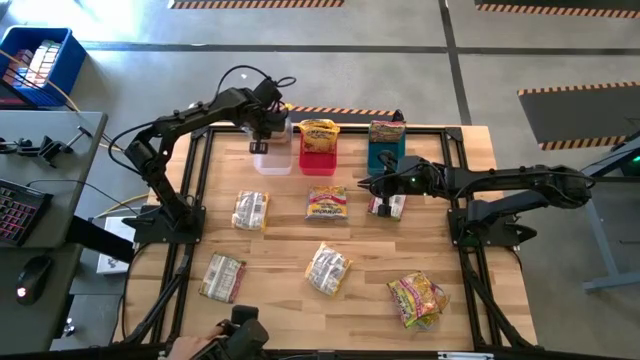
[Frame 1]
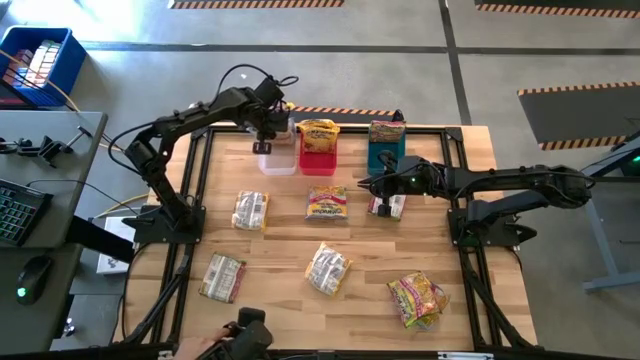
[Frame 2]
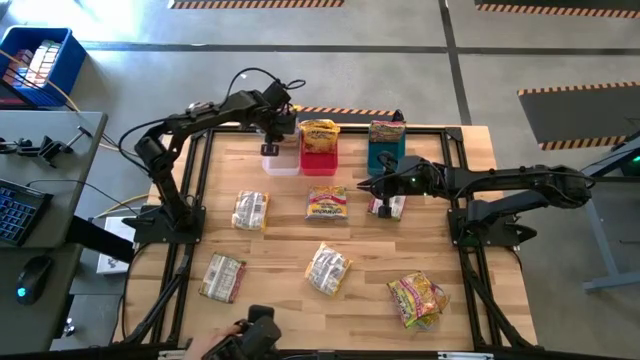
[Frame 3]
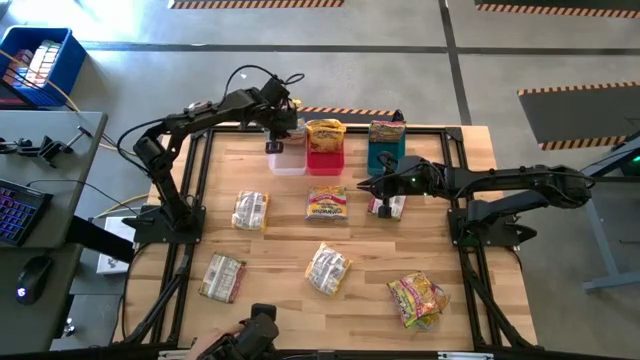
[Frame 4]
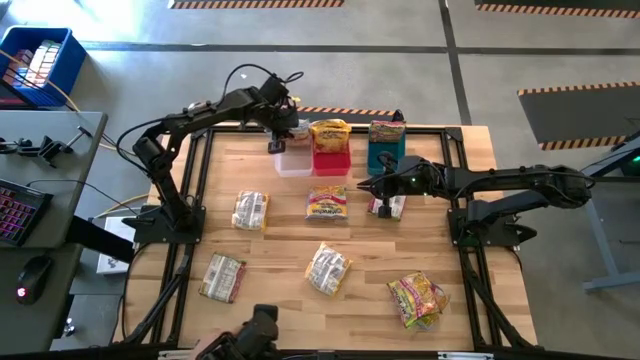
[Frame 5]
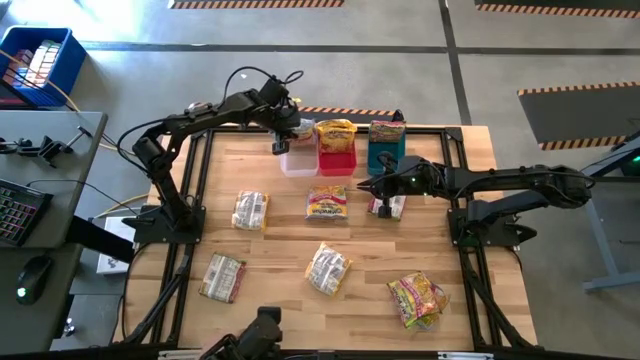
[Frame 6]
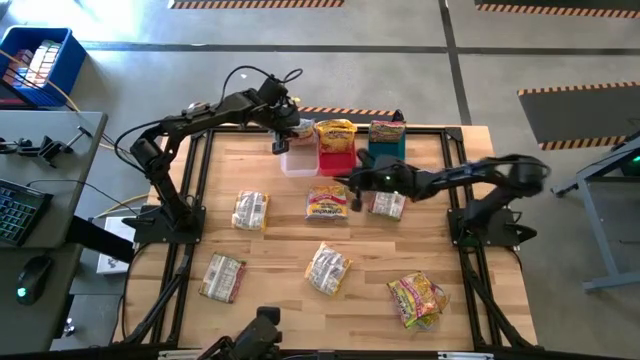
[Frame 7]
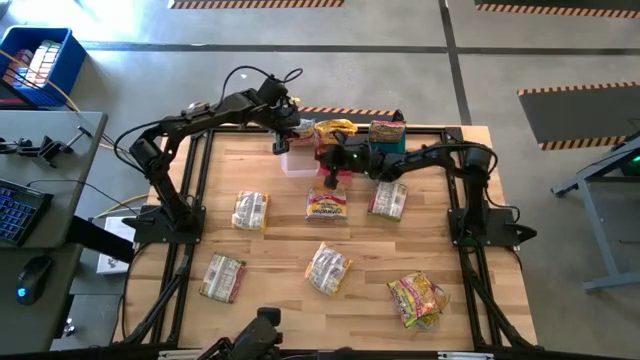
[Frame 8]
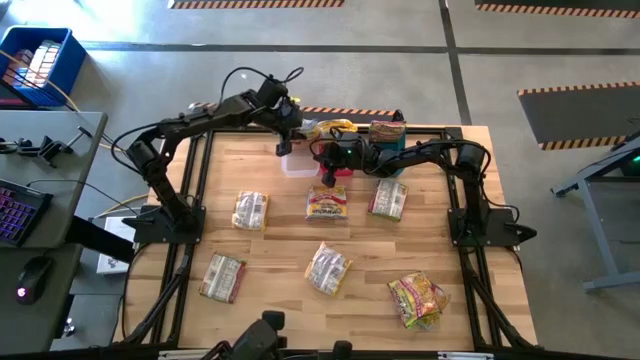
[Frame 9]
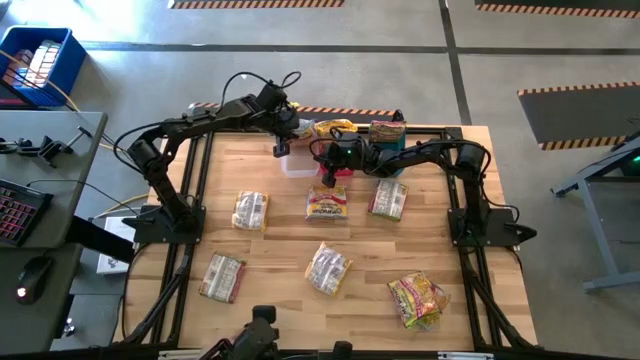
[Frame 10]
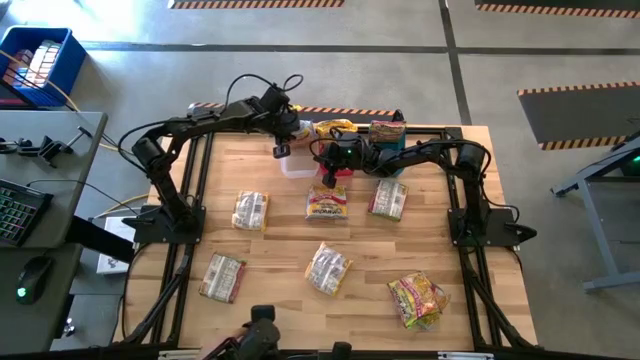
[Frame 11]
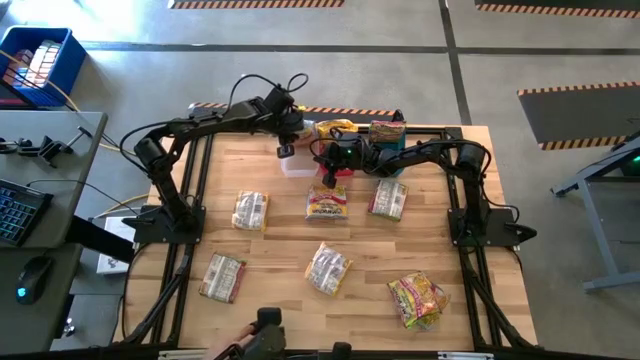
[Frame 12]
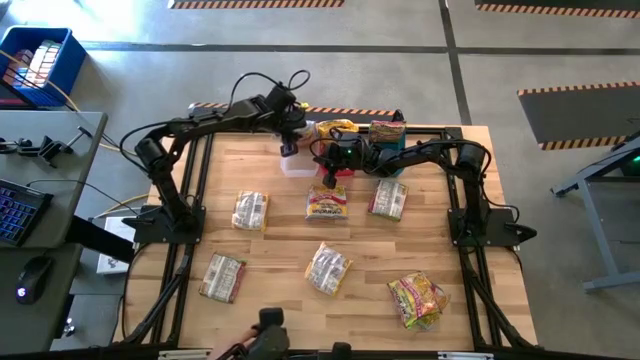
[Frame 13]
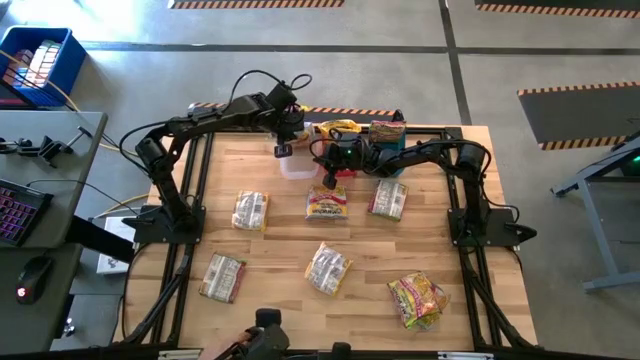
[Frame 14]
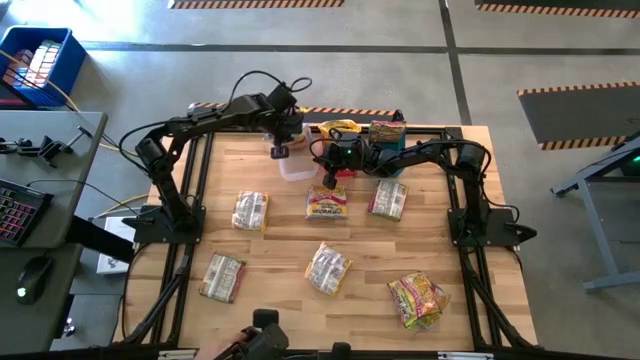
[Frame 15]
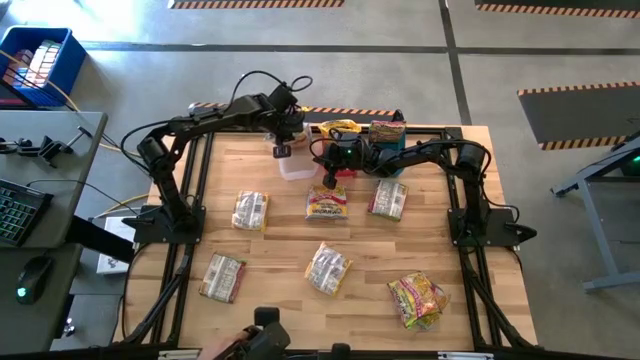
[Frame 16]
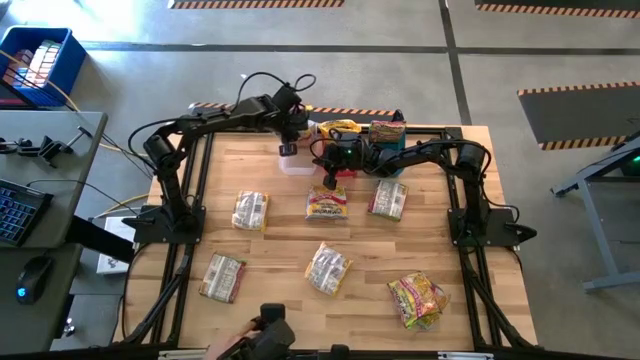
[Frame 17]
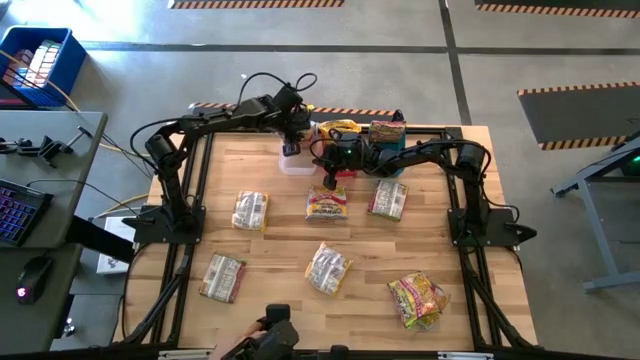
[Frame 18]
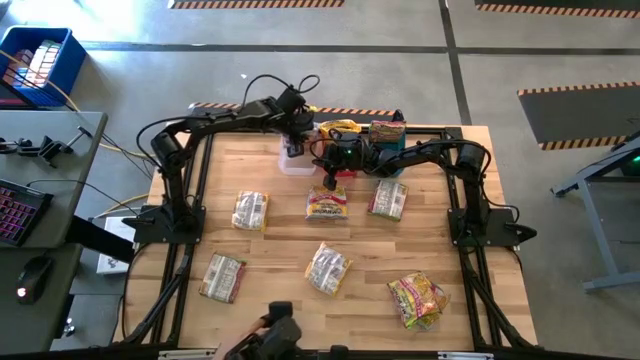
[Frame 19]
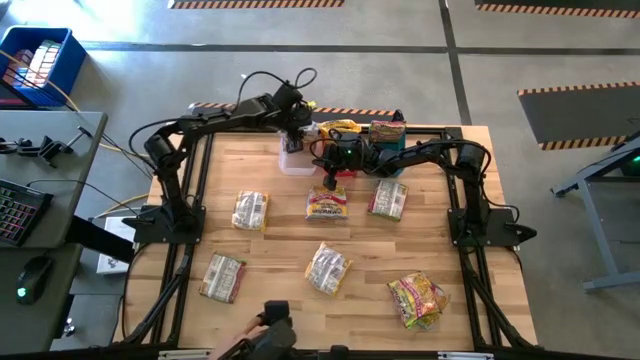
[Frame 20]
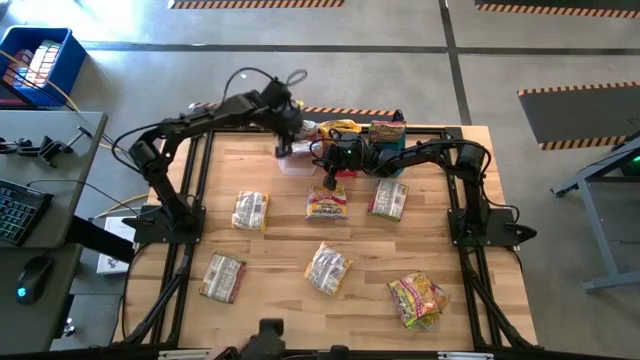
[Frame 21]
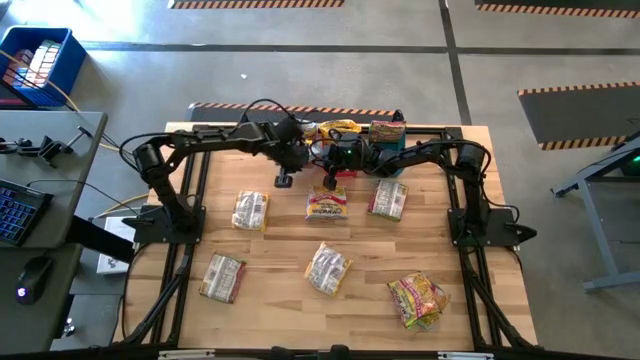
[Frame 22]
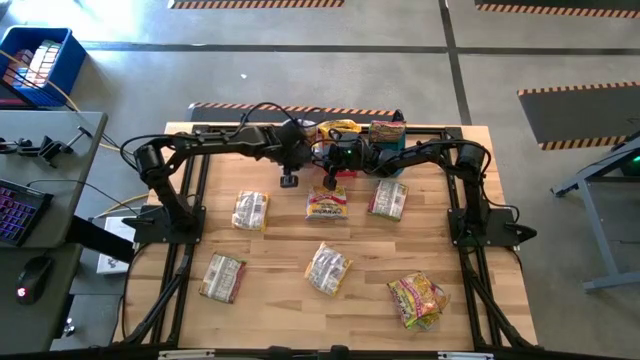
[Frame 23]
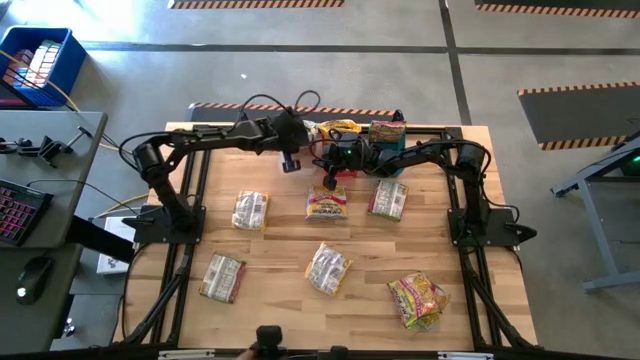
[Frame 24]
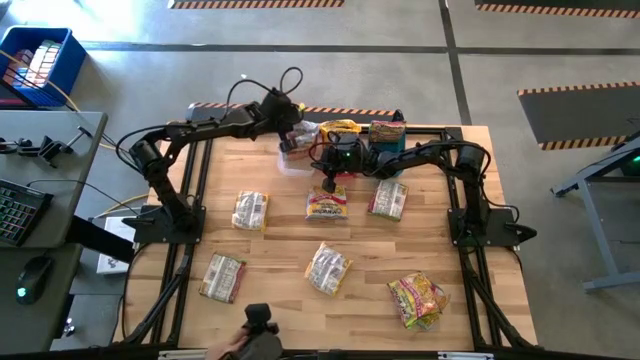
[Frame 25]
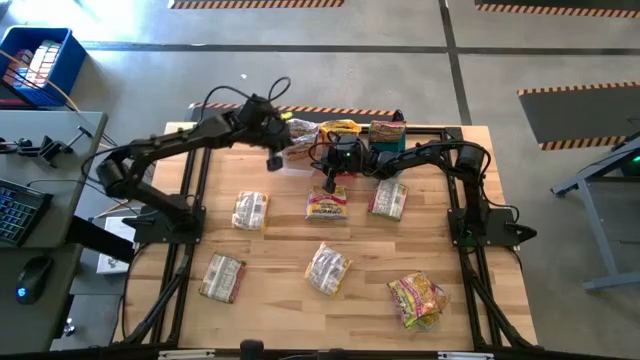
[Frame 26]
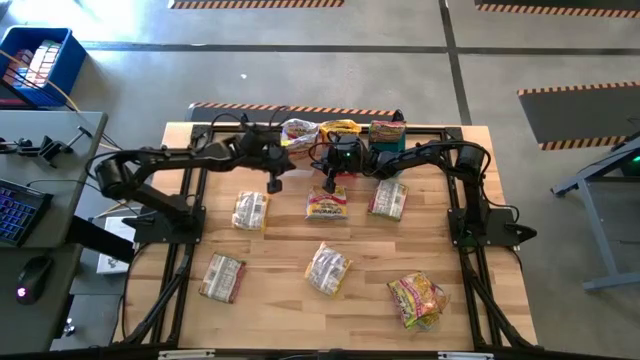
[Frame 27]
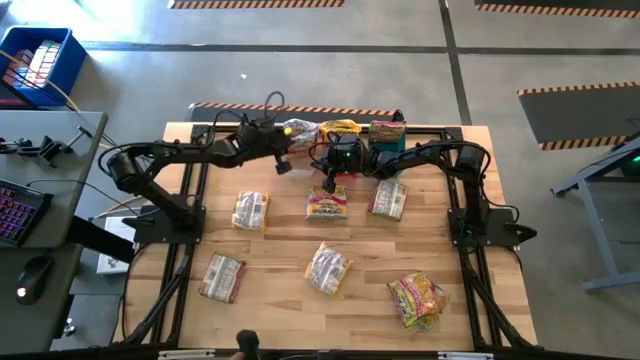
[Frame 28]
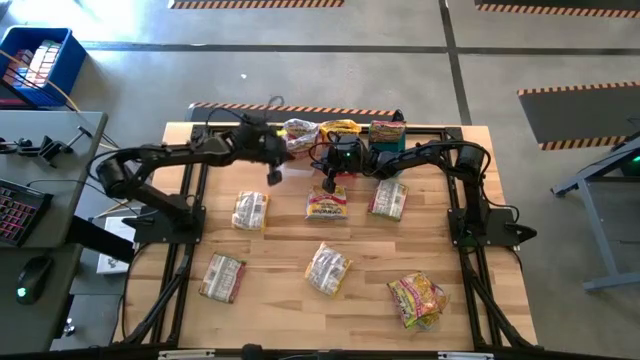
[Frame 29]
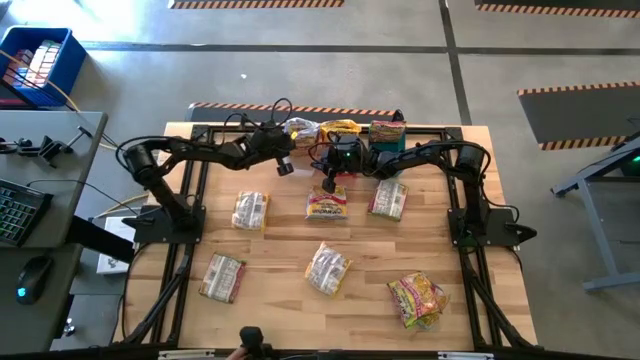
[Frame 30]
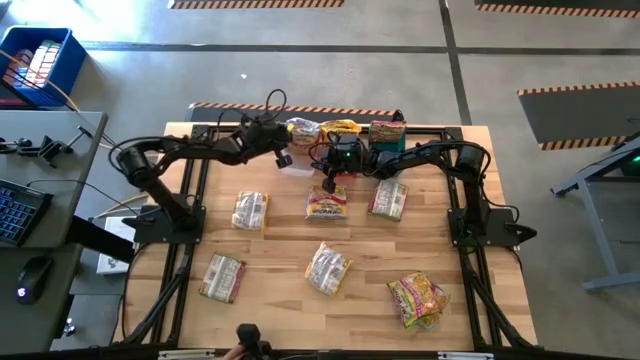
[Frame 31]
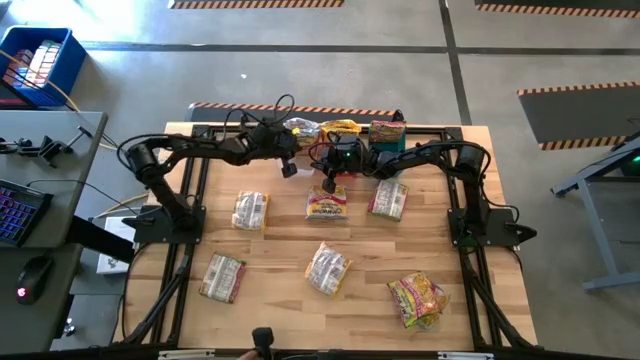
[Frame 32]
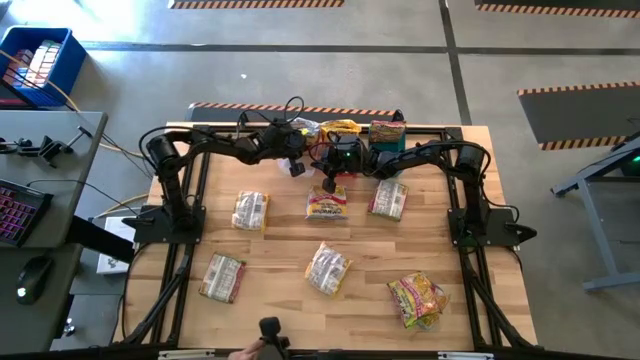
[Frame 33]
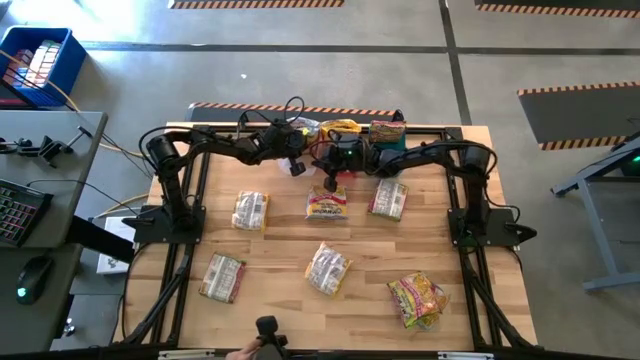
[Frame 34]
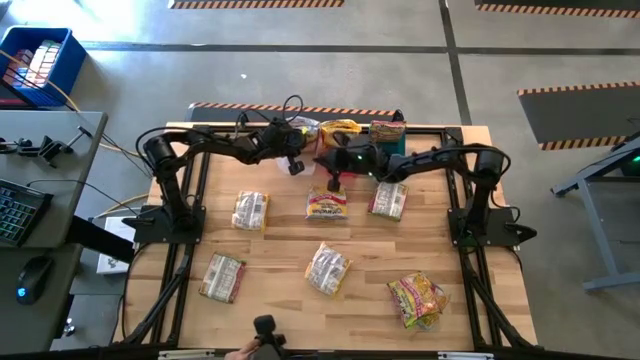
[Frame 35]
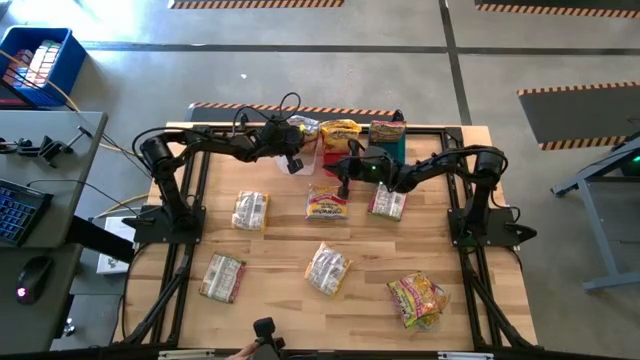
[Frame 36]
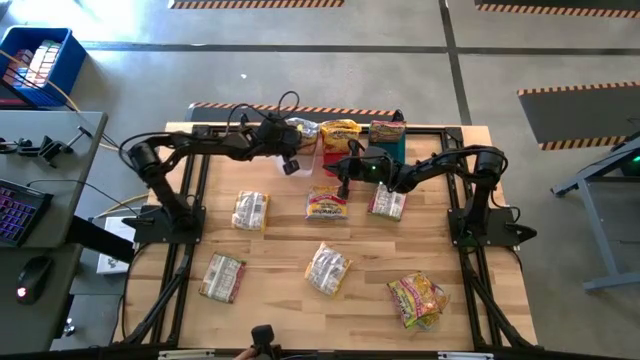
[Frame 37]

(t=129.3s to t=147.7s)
Task: Sort Maruchan noodles
Put the blue noodle pack into the transparent bin

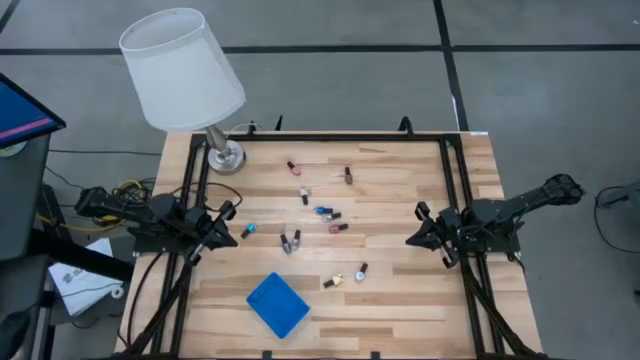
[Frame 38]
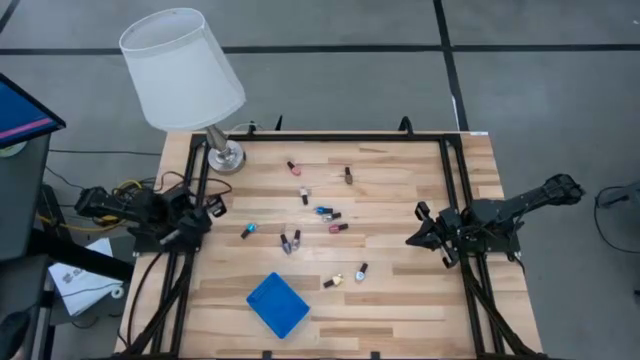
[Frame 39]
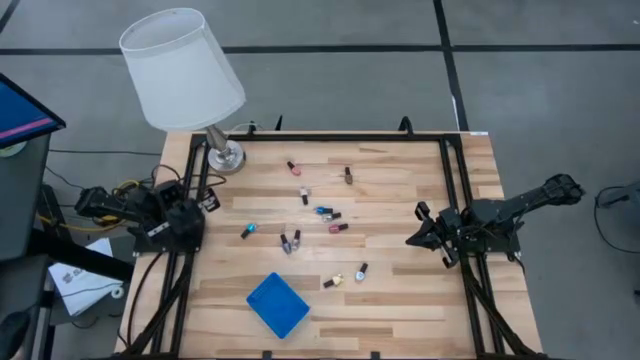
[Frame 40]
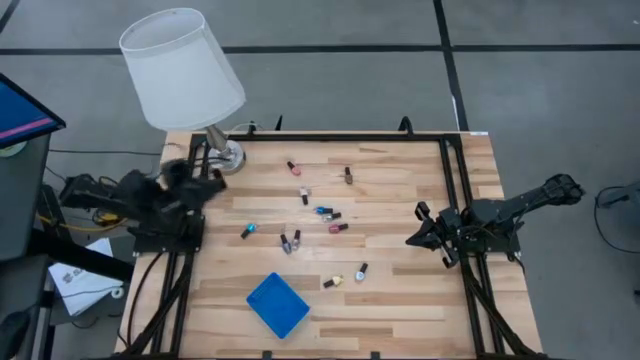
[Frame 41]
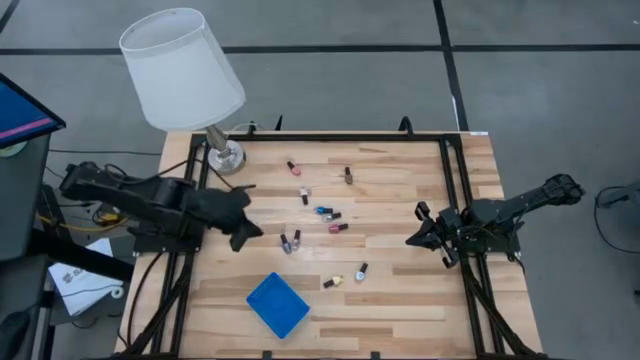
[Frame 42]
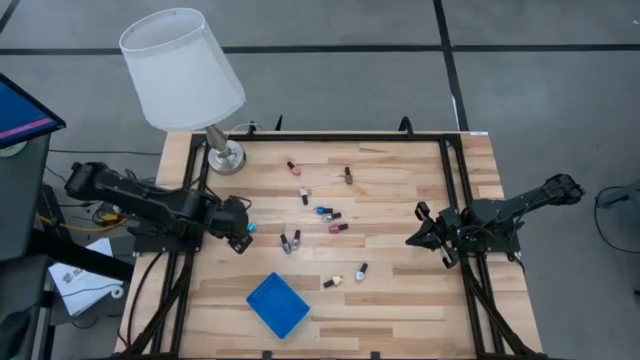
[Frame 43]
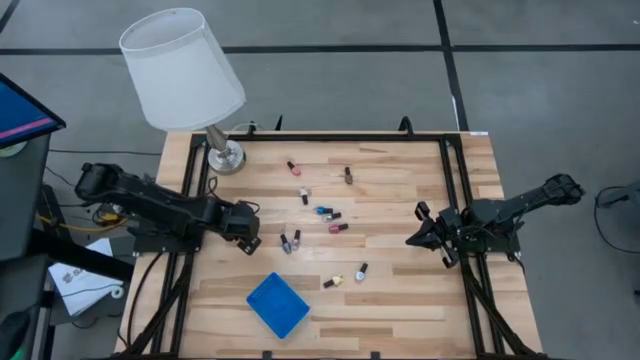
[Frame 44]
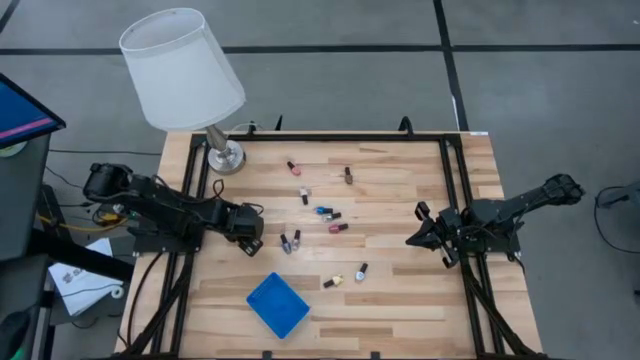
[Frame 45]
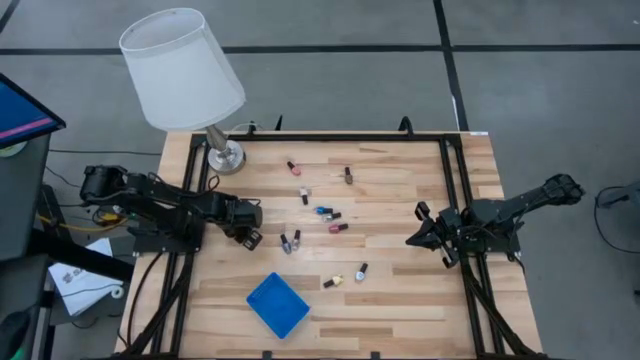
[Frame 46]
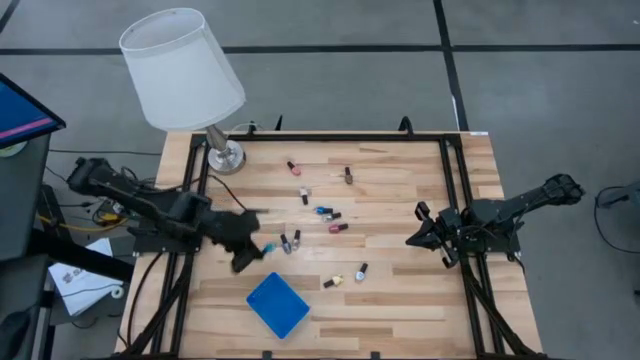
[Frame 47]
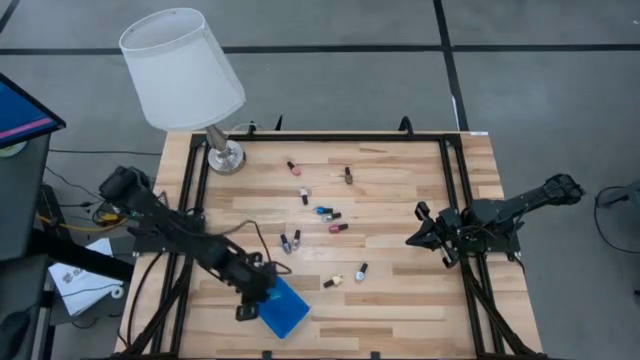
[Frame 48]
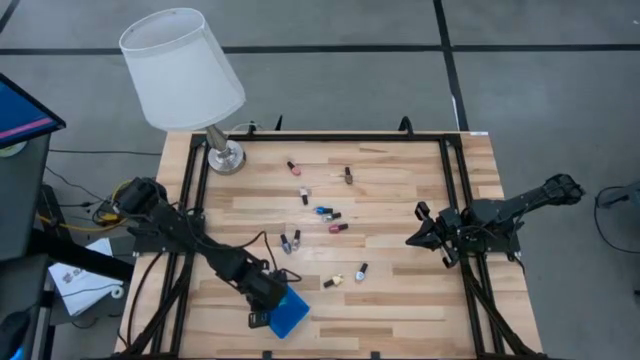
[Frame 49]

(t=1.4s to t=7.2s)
Task: Pick & Place Nail Polish
Put the light blue nail polish bottle in the blue bin
